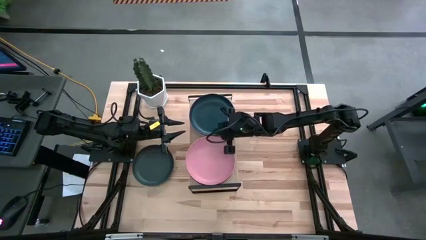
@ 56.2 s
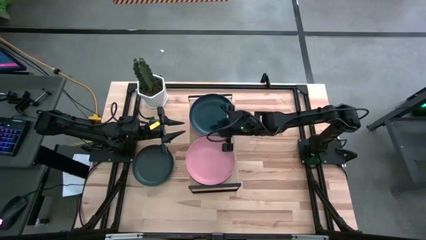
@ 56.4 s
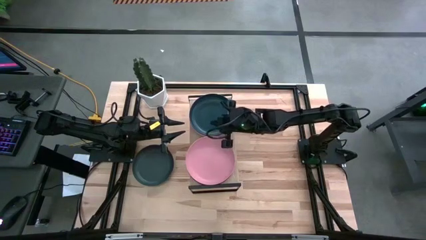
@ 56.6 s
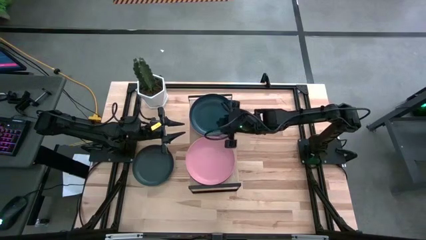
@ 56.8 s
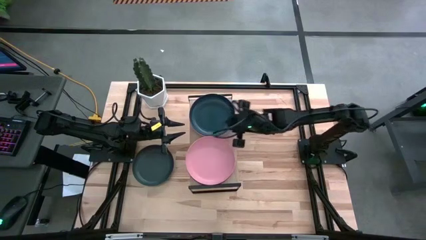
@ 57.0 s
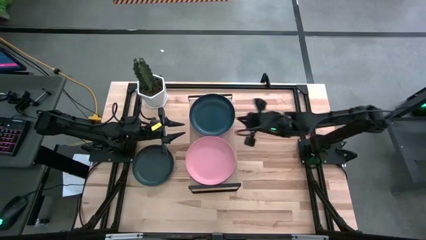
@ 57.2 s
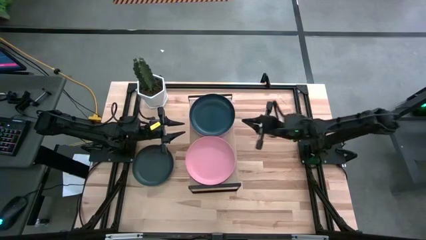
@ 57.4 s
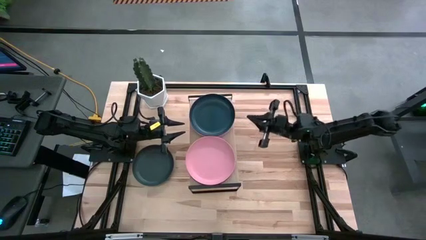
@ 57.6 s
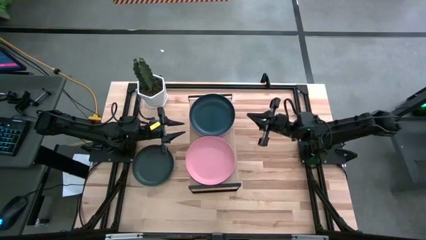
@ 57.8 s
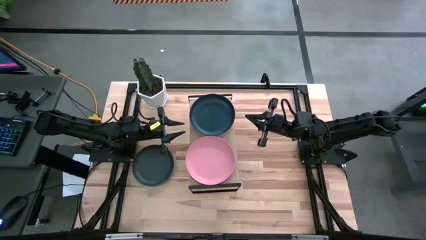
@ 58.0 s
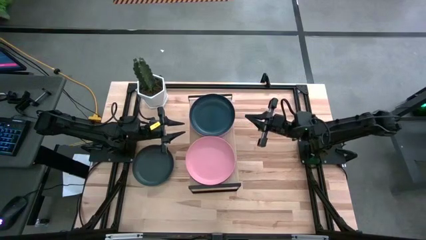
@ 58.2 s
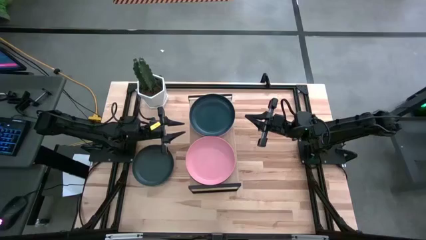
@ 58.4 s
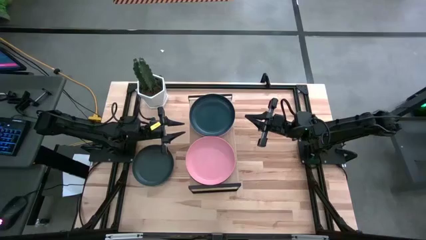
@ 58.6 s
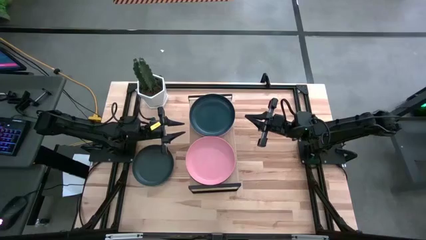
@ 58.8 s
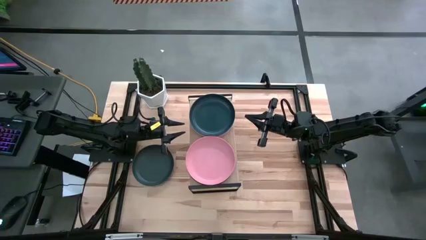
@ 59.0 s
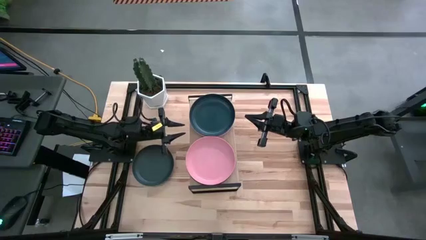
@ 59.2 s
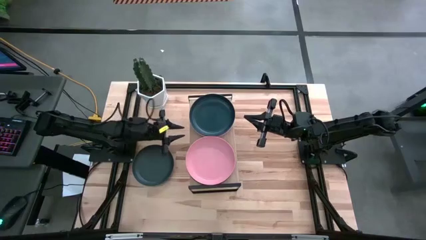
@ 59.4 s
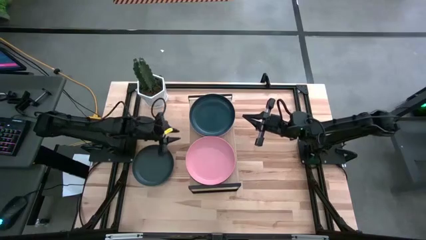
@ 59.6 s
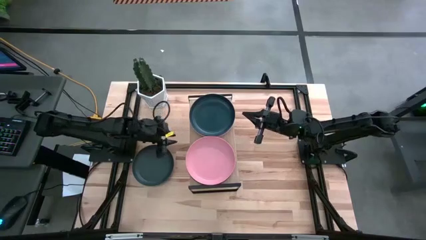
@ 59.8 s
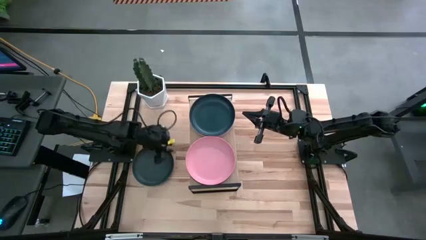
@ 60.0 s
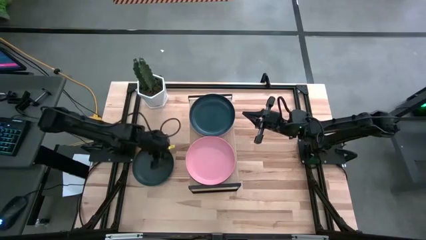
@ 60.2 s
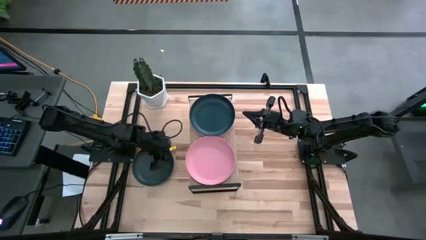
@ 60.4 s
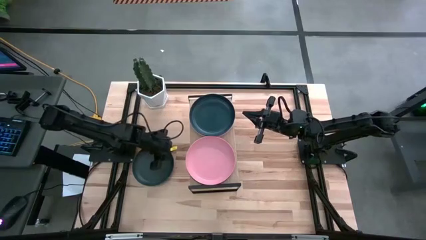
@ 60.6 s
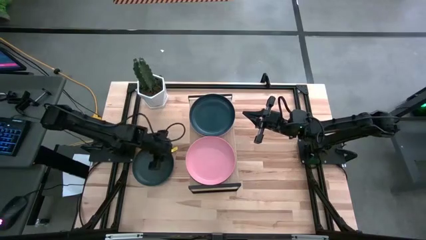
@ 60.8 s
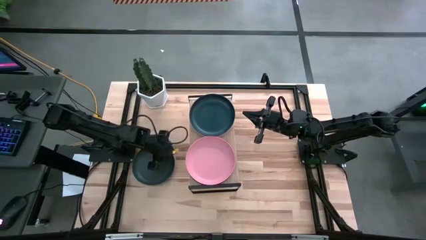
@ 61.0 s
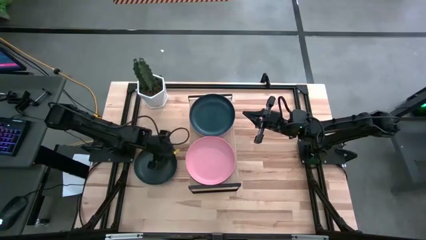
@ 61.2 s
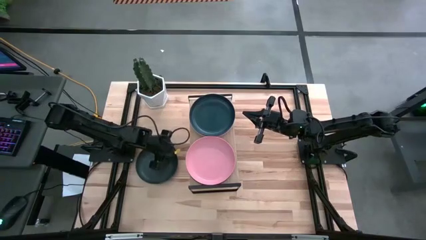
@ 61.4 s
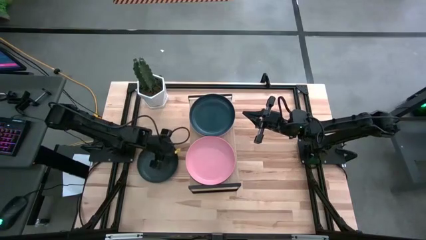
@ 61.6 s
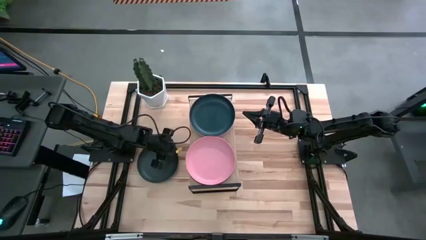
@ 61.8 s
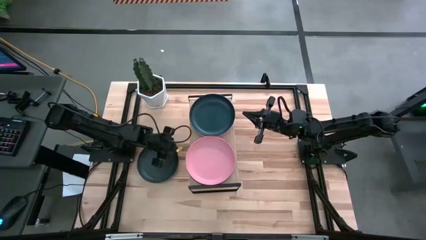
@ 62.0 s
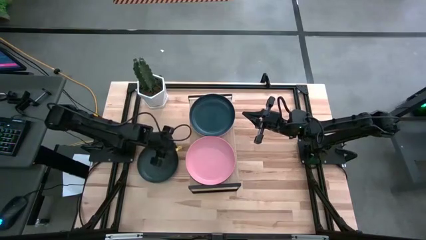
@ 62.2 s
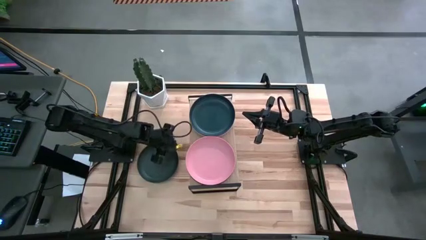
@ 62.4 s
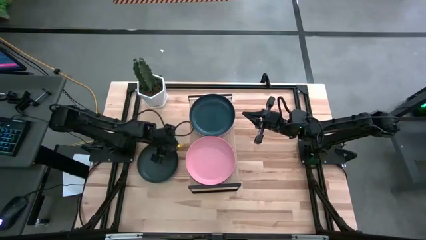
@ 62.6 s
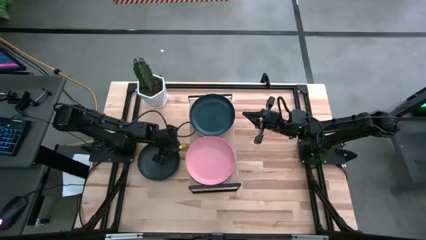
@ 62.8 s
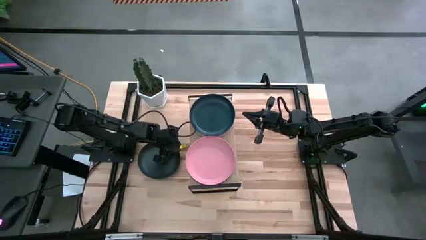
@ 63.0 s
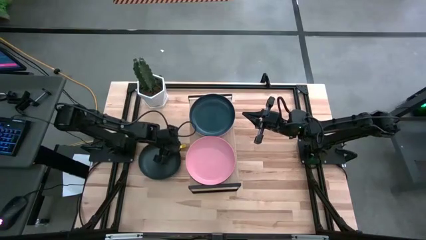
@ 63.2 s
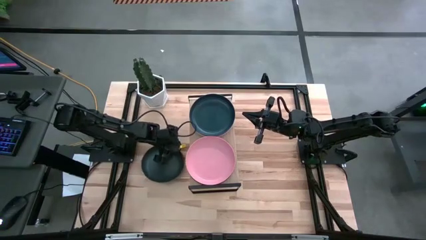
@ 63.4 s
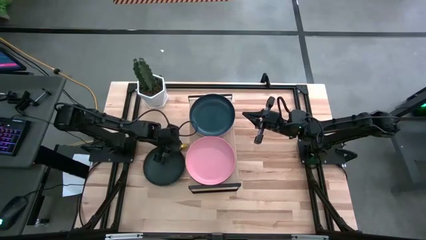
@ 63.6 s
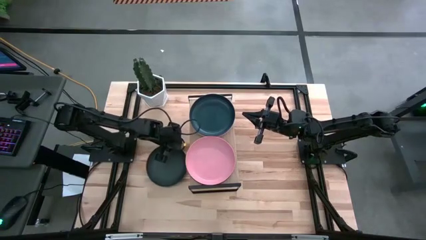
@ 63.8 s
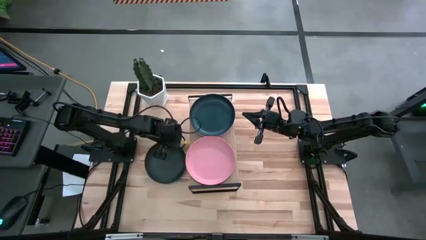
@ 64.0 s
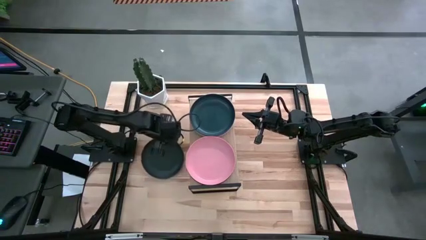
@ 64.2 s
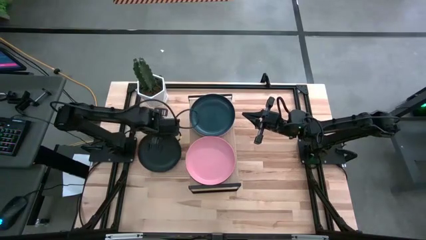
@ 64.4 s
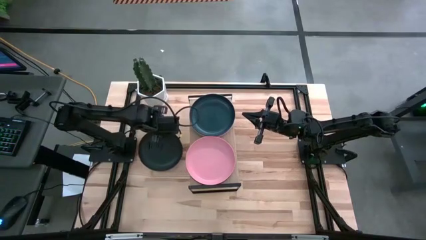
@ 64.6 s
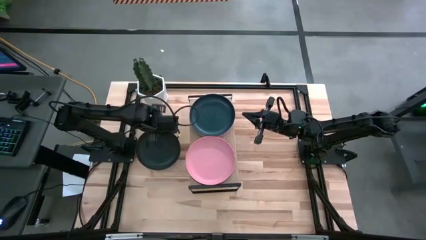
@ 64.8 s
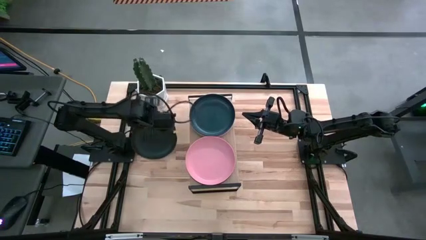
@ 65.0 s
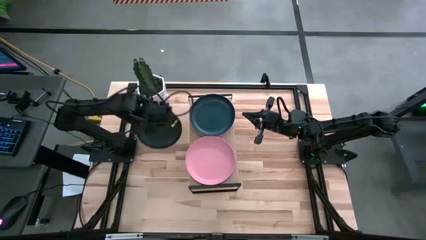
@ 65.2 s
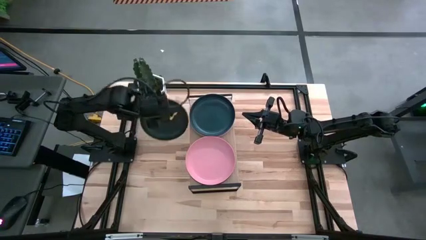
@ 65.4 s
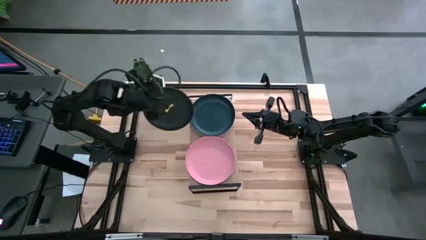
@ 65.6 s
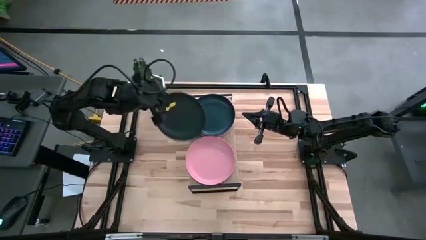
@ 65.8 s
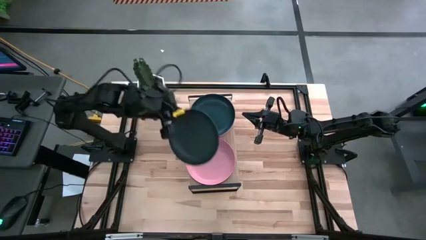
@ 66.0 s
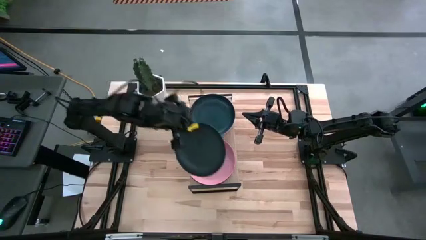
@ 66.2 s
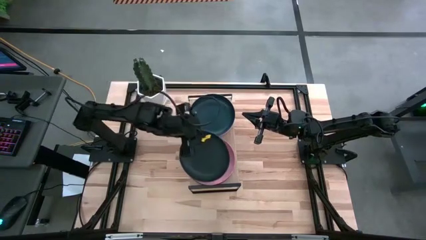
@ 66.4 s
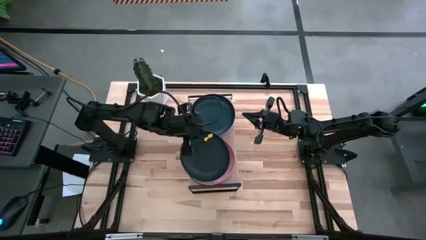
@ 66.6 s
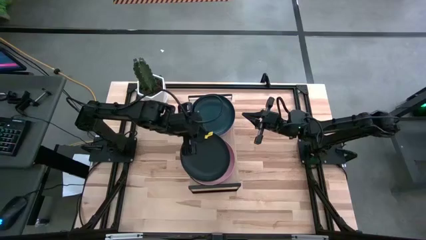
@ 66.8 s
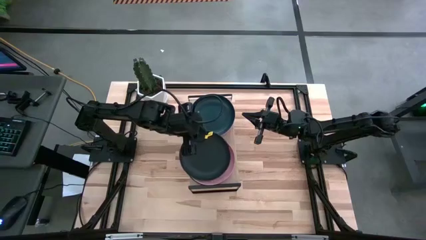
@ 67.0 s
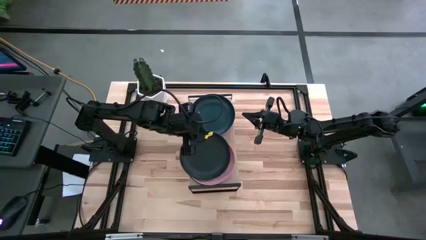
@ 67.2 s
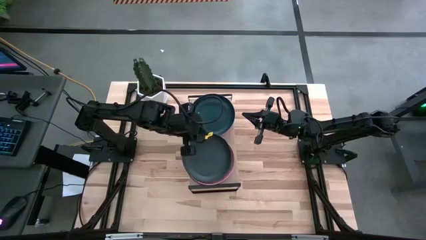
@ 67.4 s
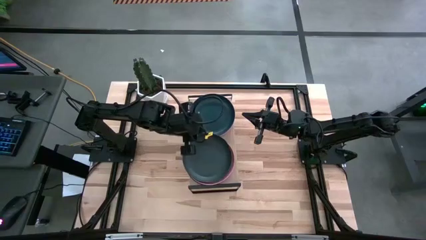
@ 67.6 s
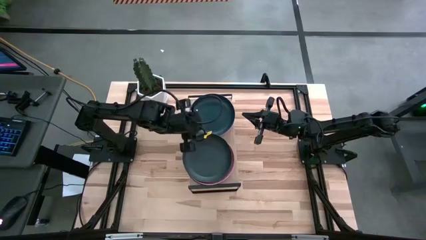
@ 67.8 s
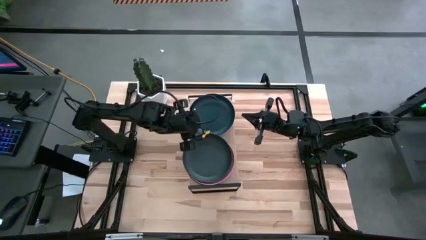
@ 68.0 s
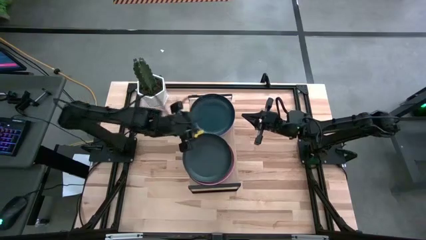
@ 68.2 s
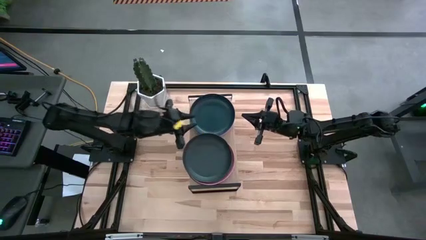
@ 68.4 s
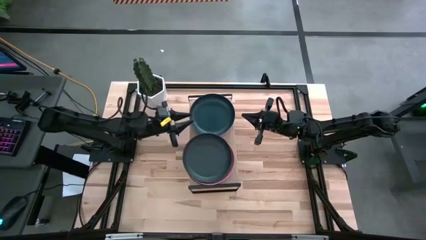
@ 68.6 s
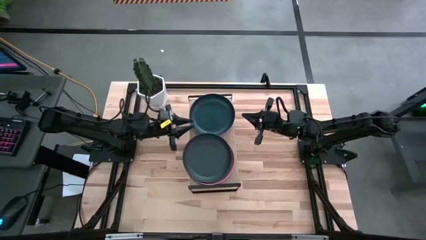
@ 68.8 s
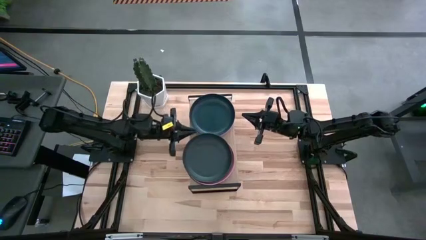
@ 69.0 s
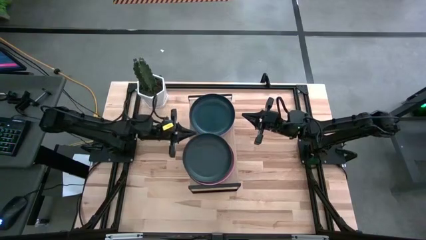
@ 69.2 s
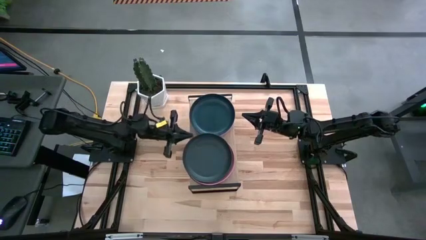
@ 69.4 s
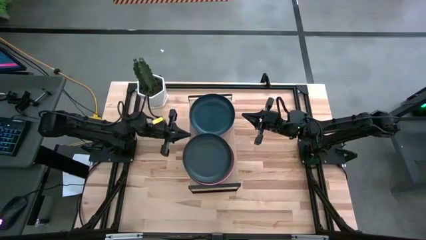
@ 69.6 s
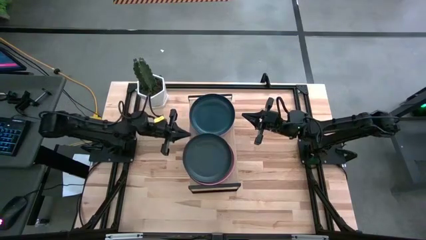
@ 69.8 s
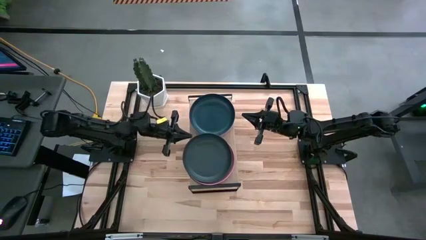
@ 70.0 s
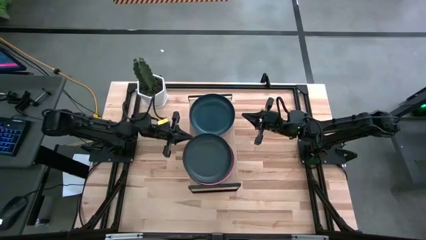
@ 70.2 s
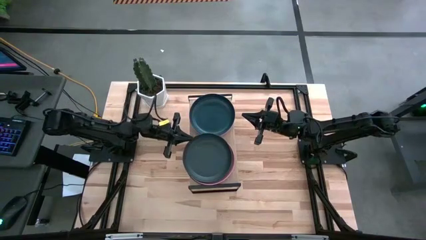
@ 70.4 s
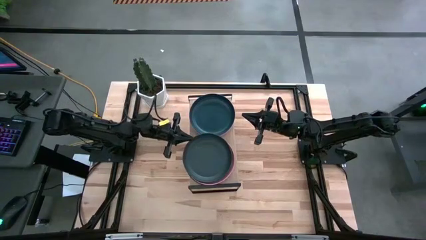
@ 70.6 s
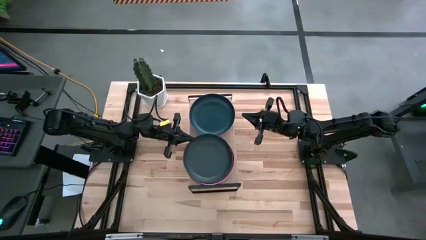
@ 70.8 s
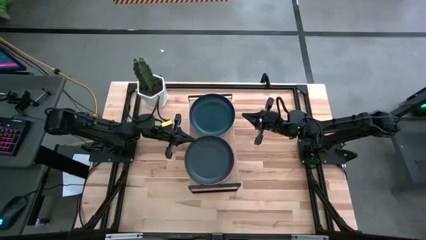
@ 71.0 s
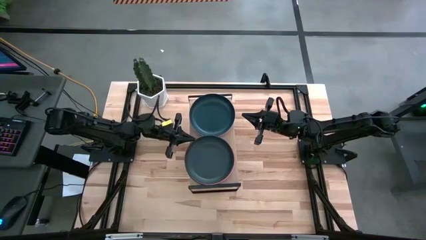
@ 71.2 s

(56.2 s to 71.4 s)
Task: Place and stack plates onto a shelf
Stack the black plate on top of the light pink plate on the shelf
